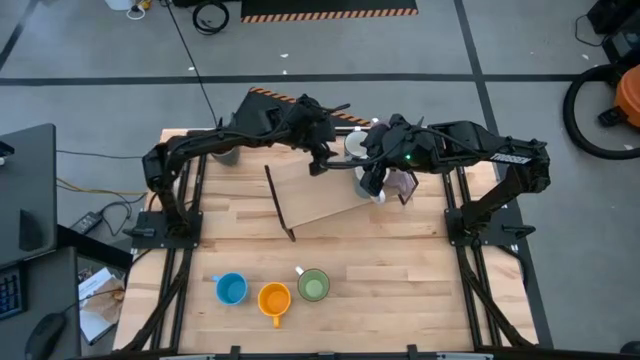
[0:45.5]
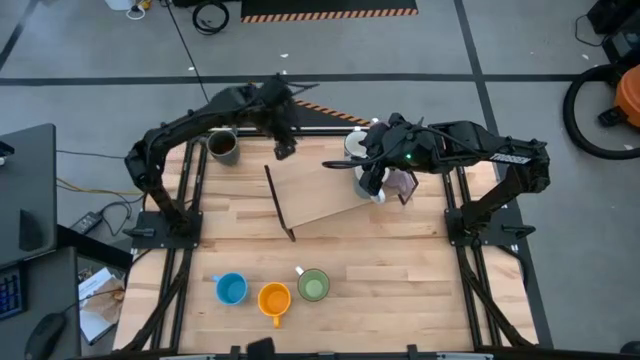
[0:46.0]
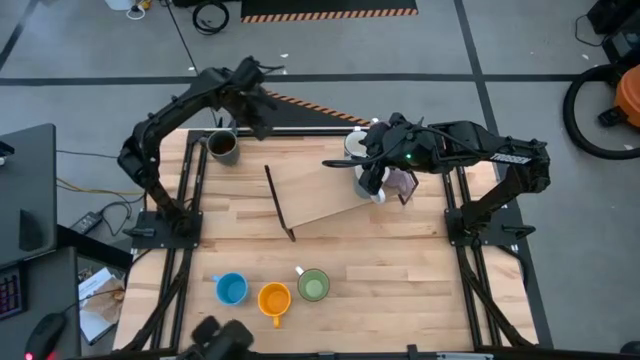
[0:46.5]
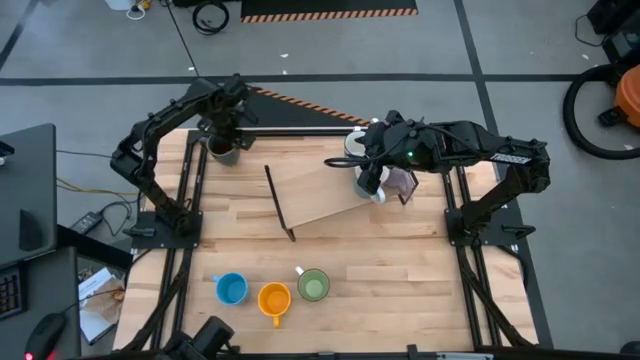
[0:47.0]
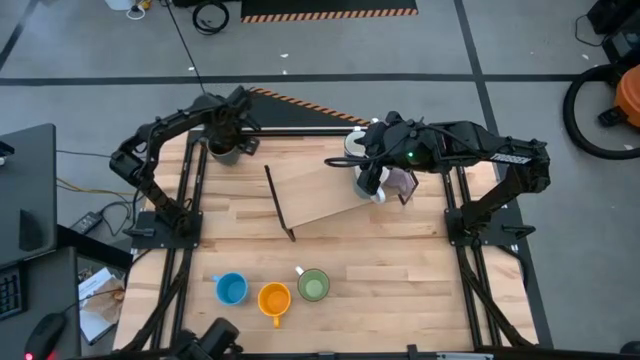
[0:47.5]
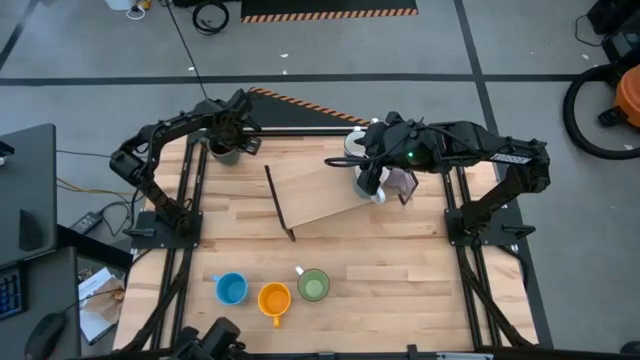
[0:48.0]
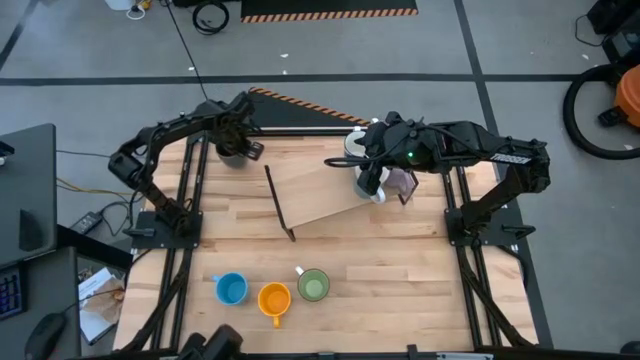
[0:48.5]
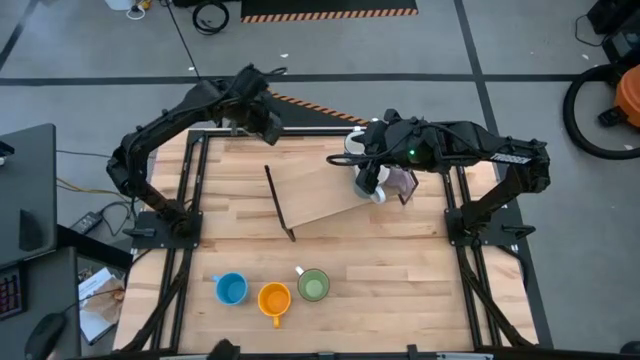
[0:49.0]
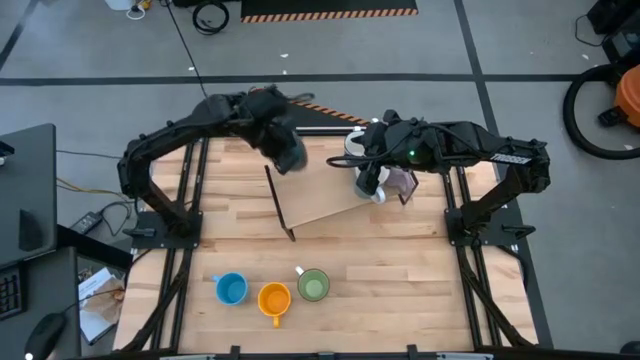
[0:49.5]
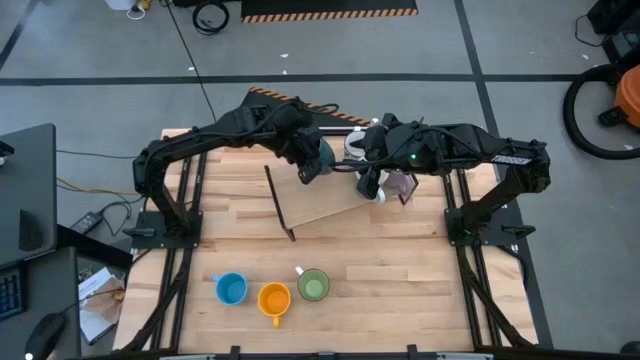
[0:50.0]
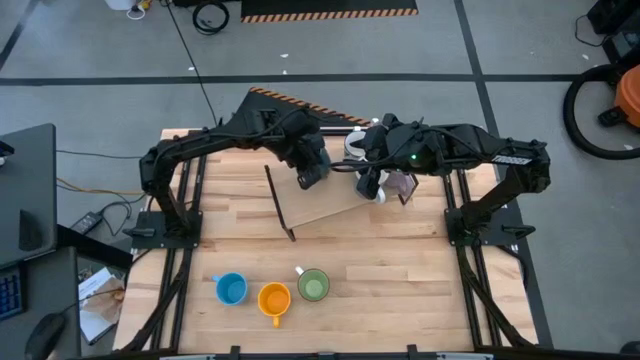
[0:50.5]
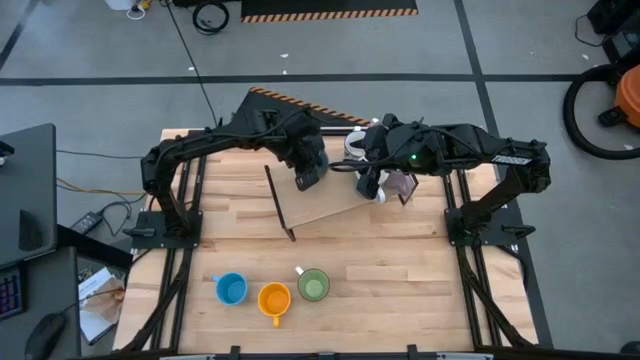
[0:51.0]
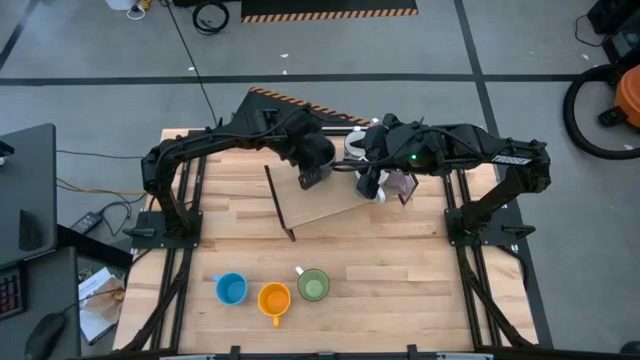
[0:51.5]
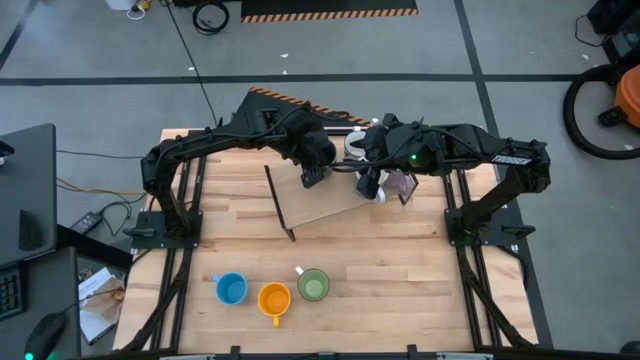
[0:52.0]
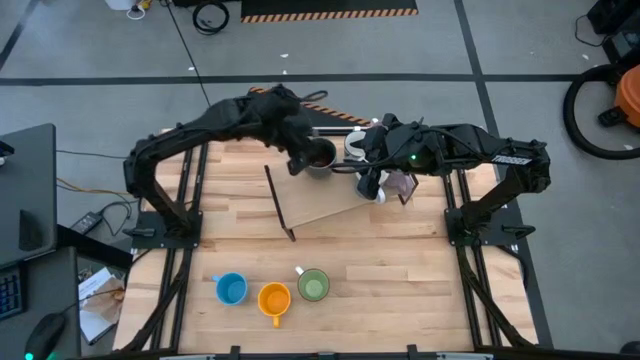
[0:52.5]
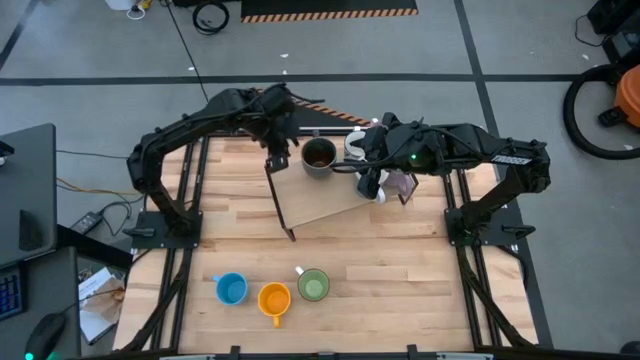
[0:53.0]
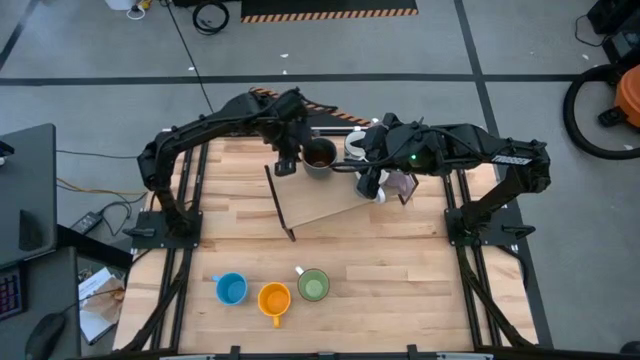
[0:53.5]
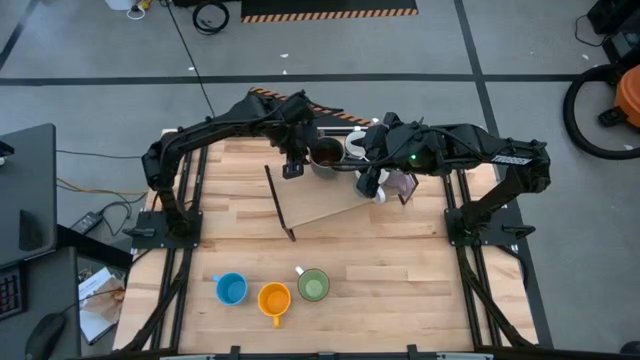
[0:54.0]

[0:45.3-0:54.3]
Task: Place coffee mugs
Put the blue and green mug on the shelf

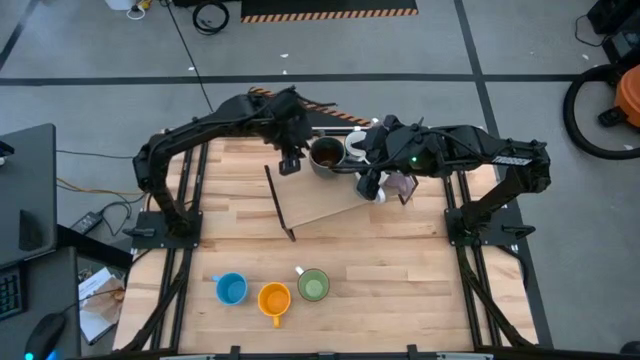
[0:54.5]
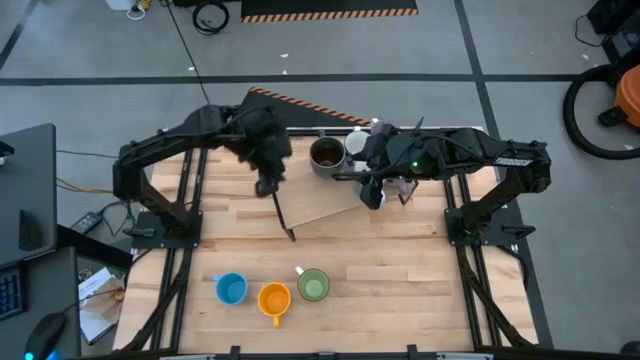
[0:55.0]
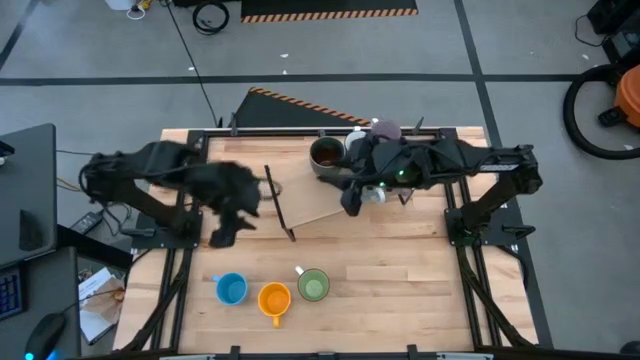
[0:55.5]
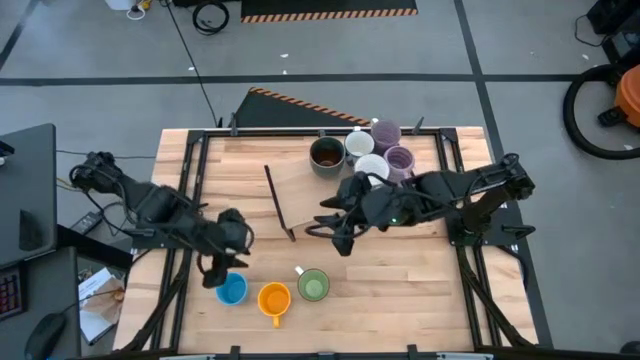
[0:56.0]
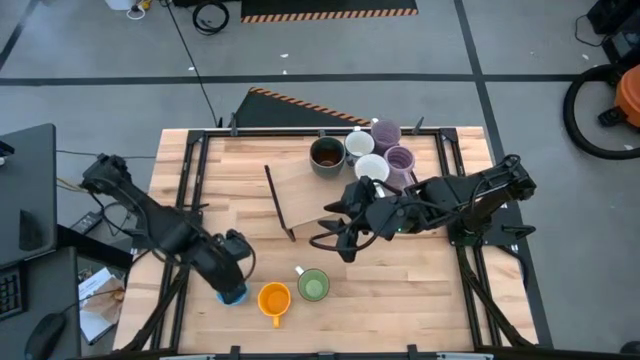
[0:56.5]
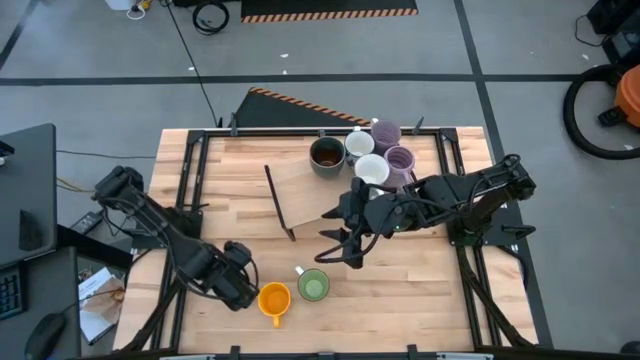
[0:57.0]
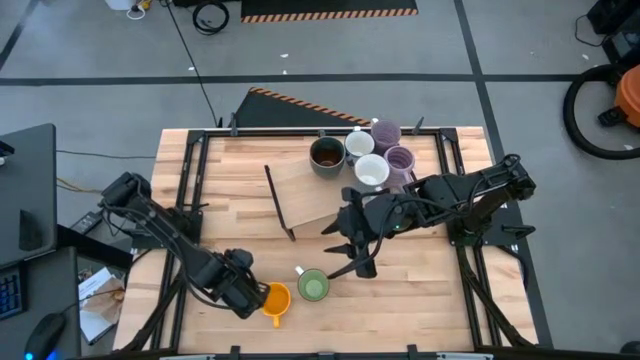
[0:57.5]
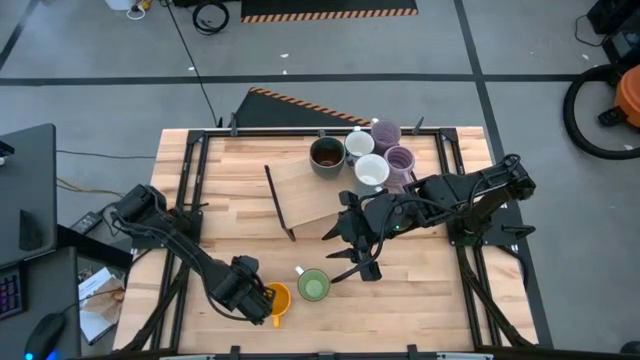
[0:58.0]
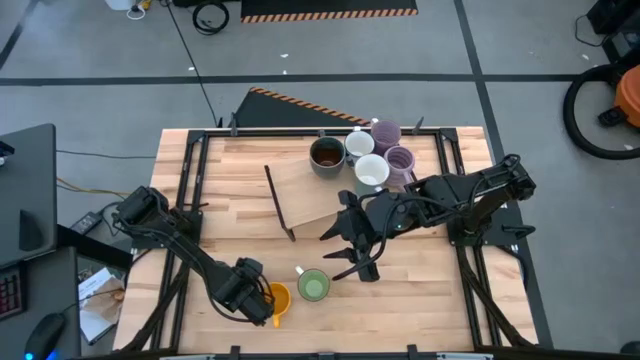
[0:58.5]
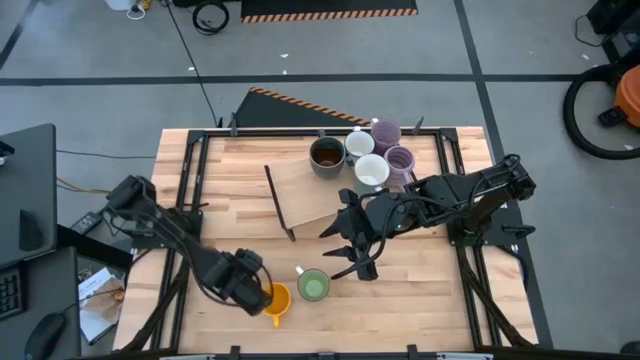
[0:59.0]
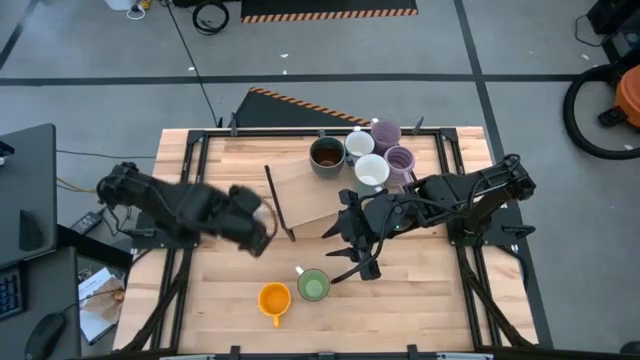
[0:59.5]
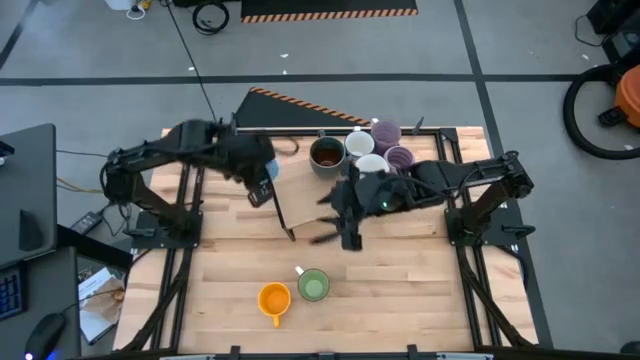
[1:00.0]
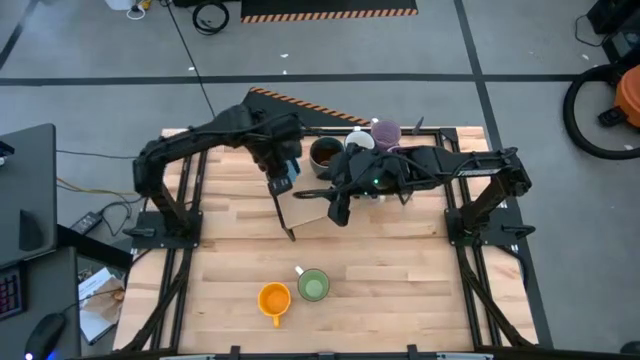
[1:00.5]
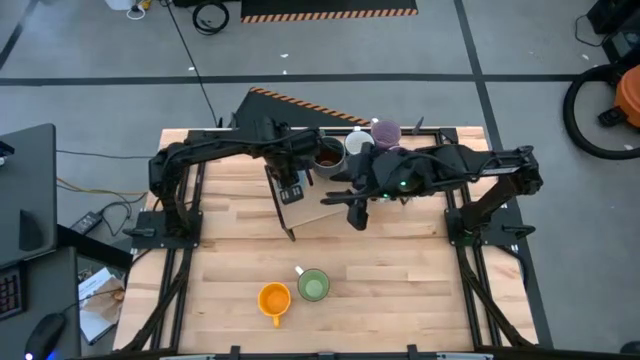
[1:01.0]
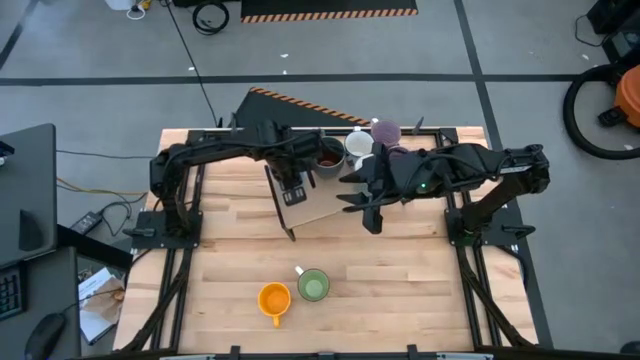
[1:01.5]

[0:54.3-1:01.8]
Put the blue mug on the shelf

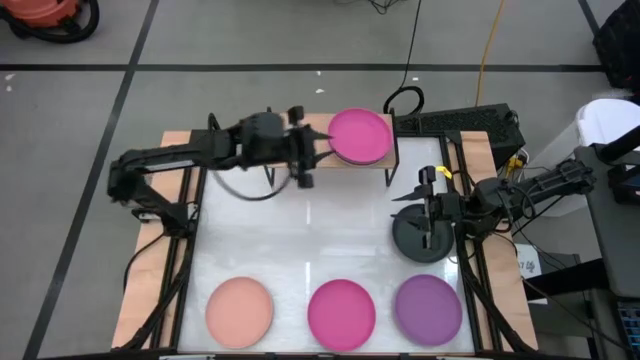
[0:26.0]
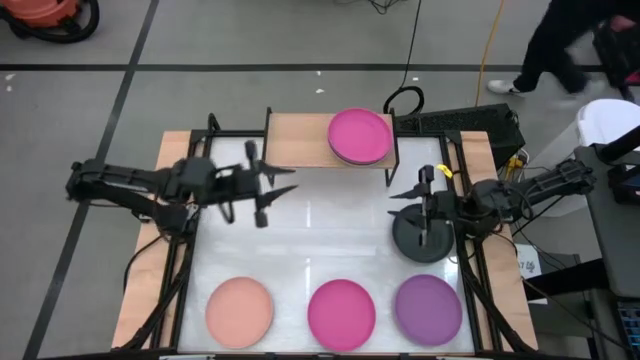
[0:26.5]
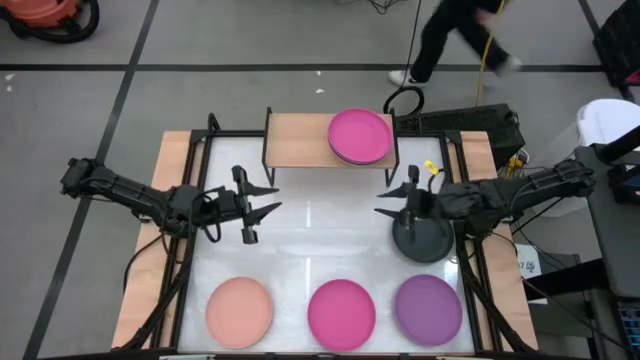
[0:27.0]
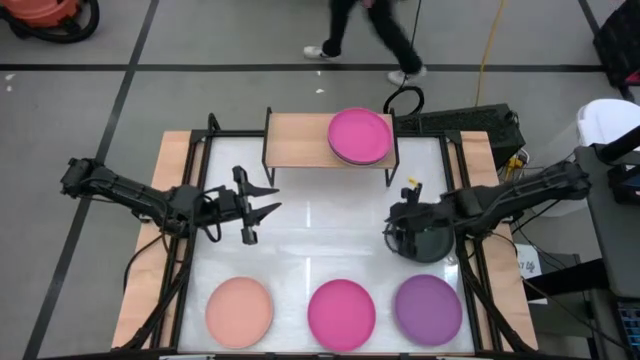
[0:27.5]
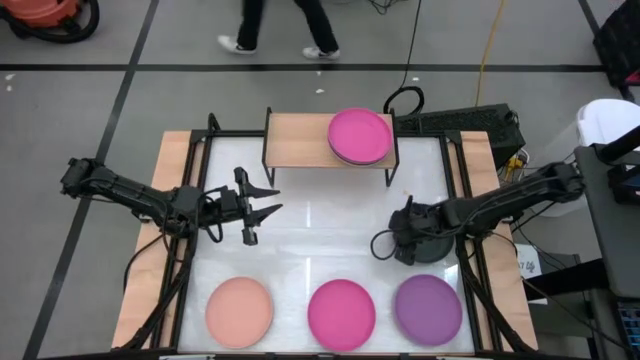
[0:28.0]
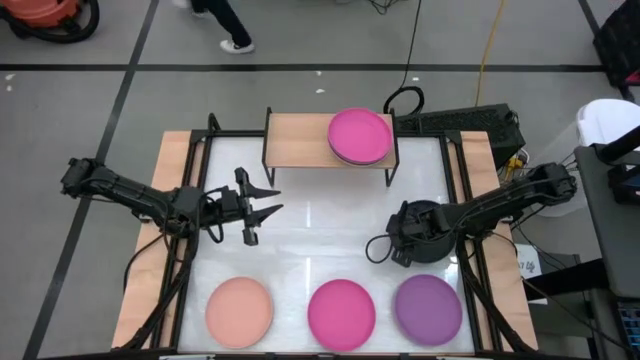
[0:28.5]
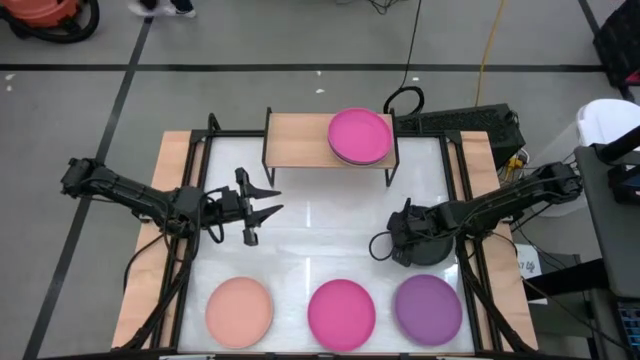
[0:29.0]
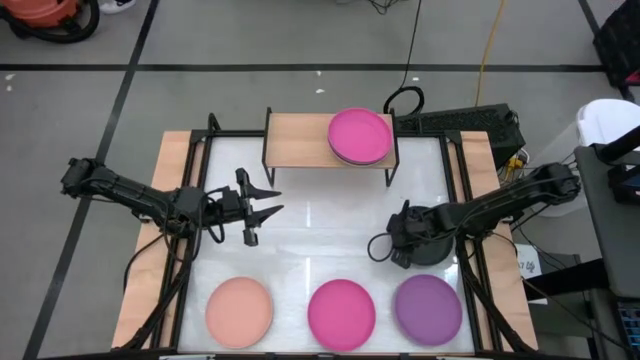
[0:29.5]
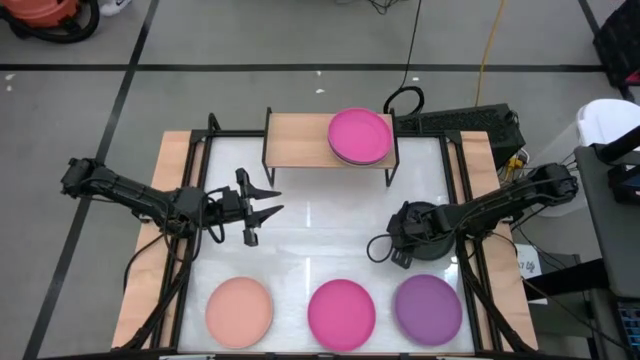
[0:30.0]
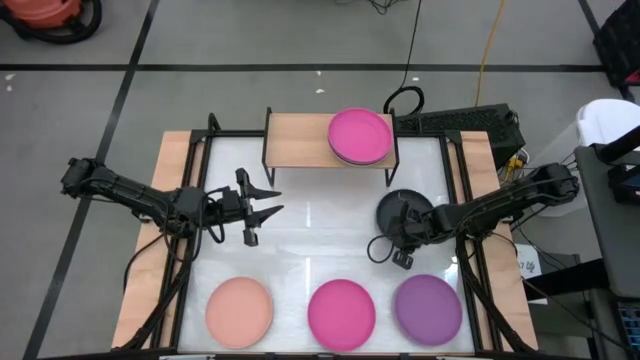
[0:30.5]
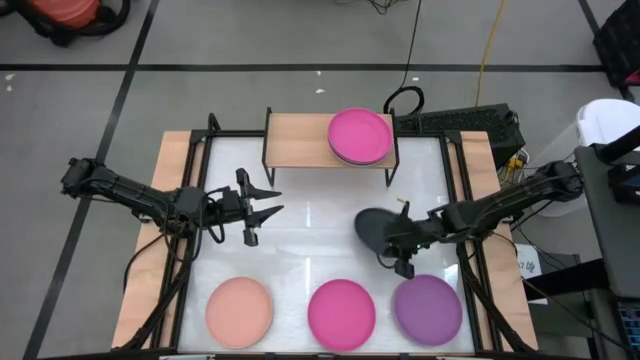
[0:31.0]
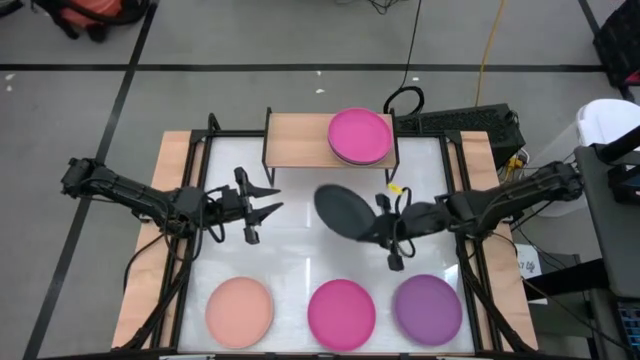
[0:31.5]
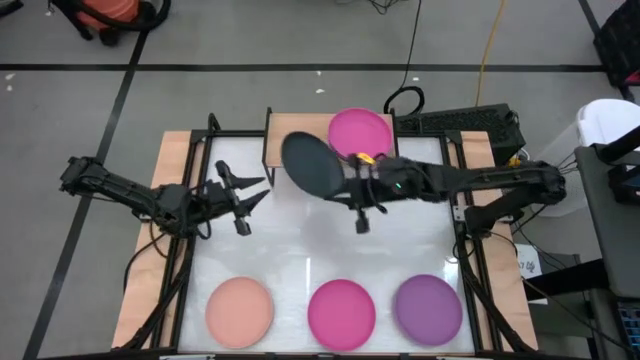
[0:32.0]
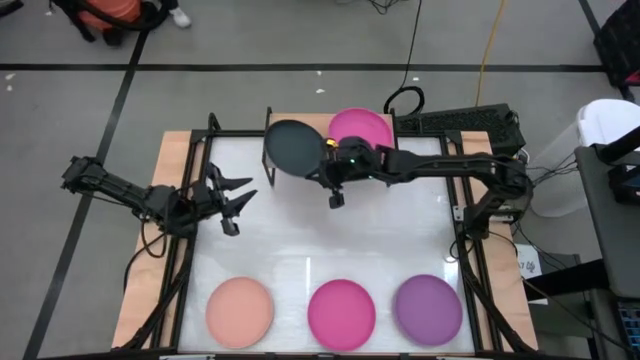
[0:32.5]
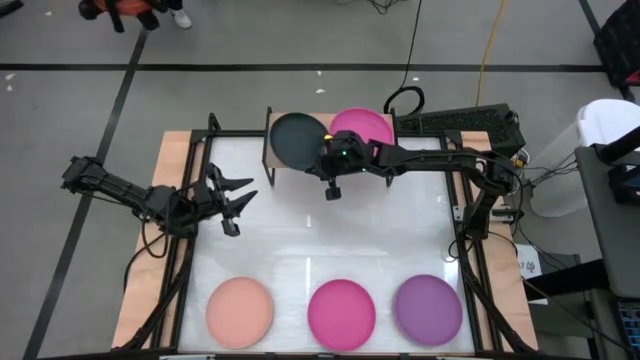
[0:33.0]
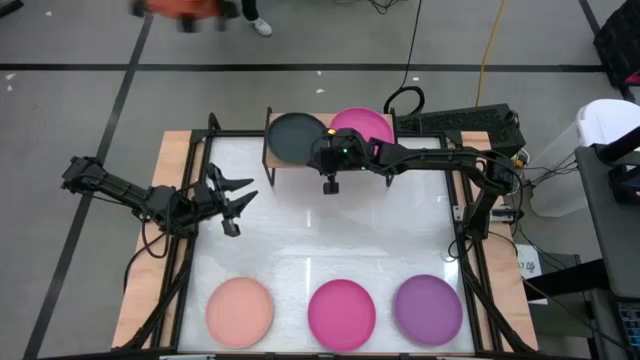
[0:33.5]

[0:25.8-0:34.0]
Task: Place and stack plates onto a shelf
Put the black plate to the left on the shelf
